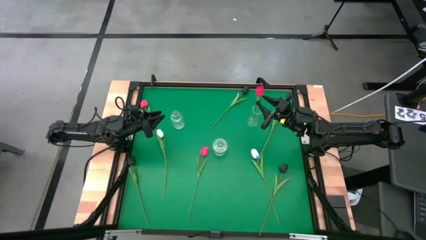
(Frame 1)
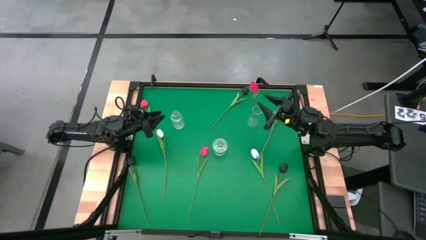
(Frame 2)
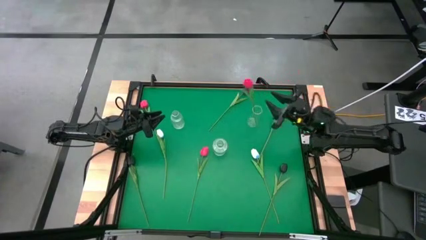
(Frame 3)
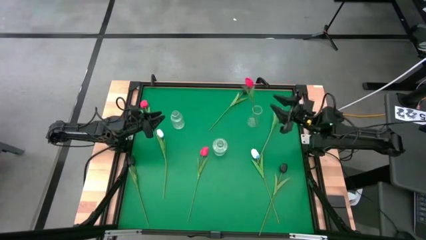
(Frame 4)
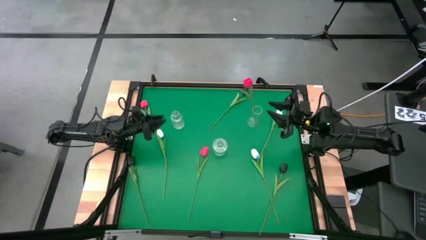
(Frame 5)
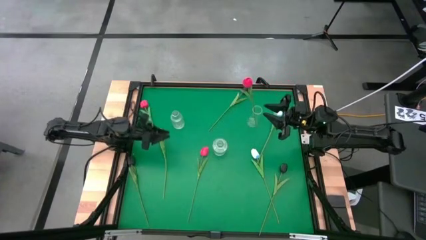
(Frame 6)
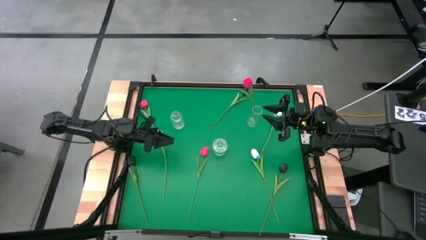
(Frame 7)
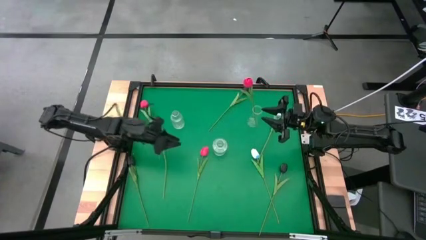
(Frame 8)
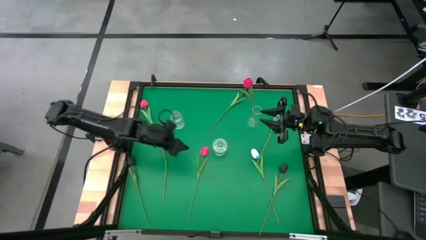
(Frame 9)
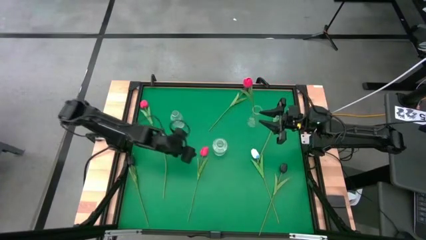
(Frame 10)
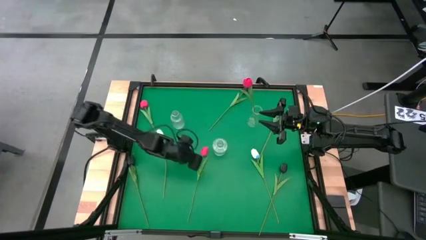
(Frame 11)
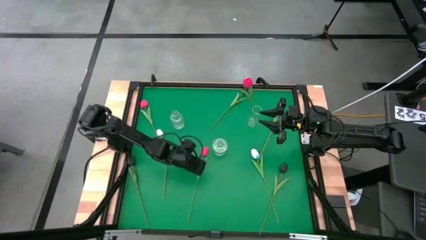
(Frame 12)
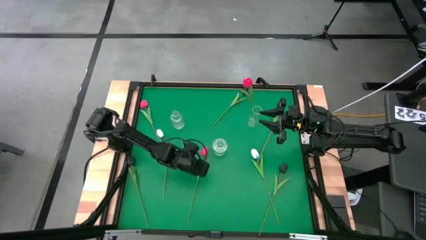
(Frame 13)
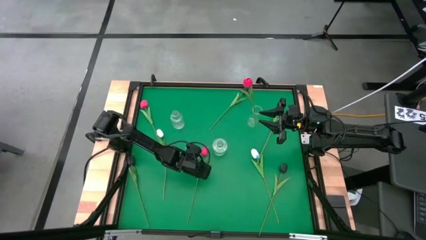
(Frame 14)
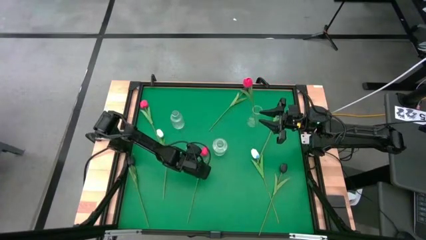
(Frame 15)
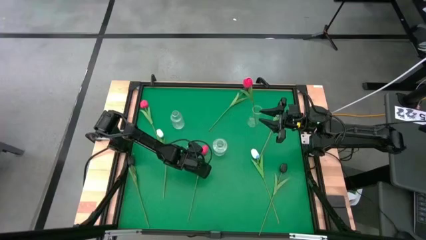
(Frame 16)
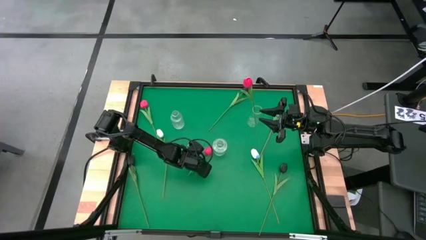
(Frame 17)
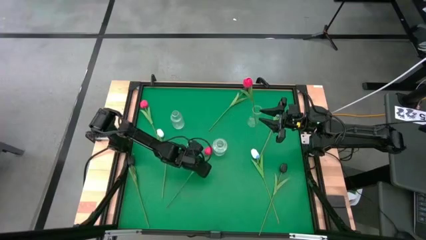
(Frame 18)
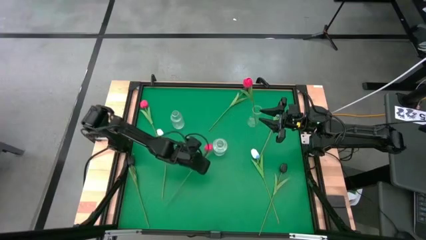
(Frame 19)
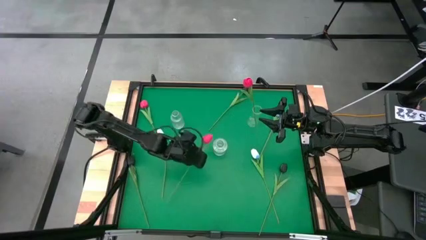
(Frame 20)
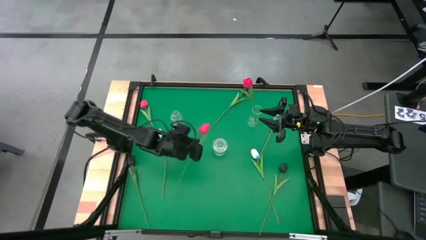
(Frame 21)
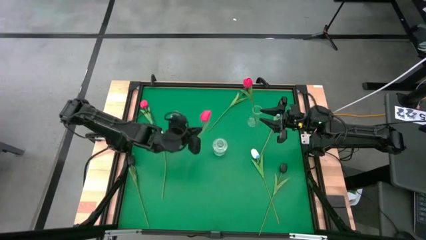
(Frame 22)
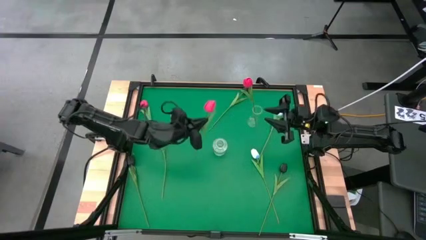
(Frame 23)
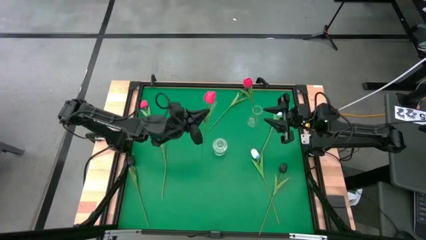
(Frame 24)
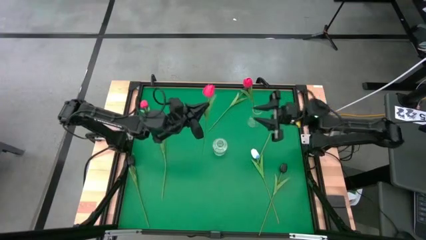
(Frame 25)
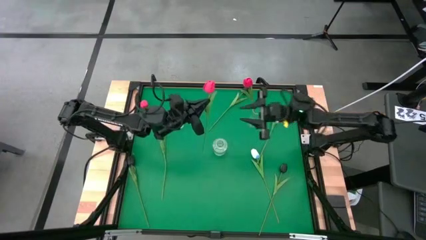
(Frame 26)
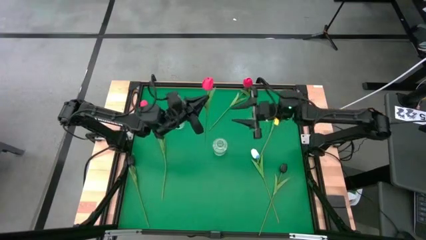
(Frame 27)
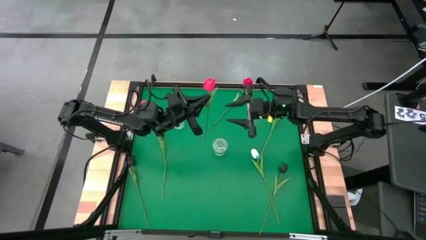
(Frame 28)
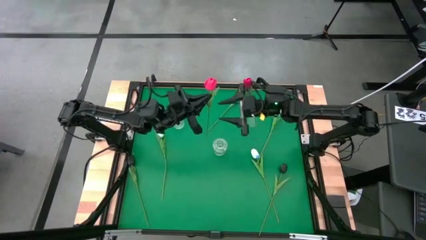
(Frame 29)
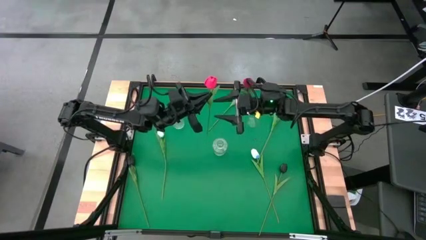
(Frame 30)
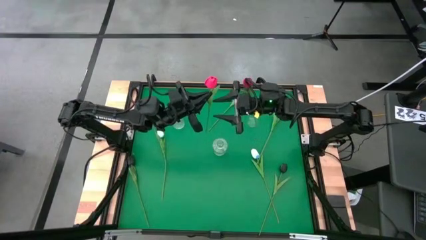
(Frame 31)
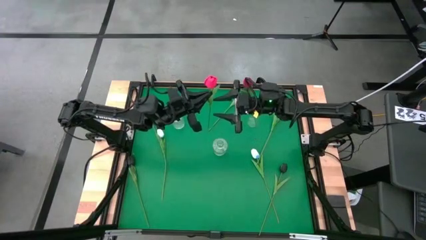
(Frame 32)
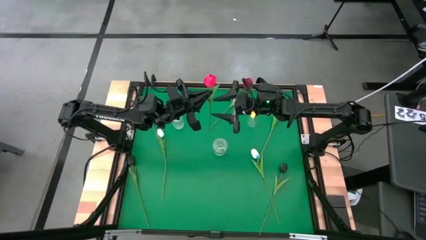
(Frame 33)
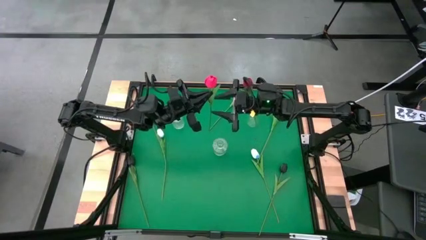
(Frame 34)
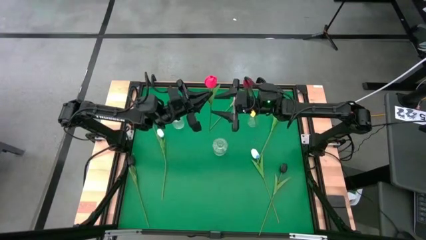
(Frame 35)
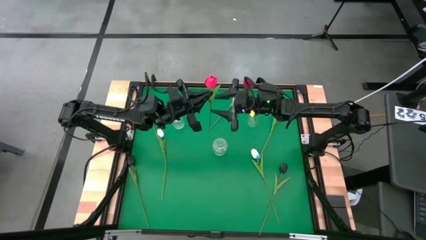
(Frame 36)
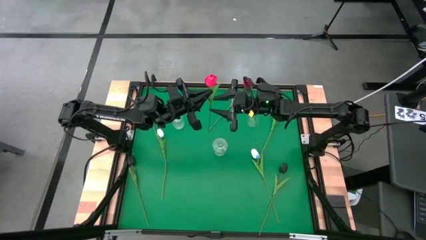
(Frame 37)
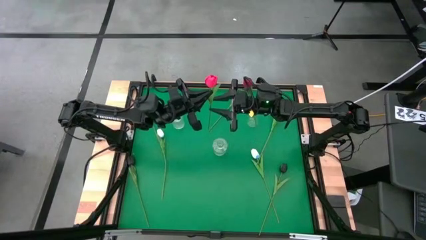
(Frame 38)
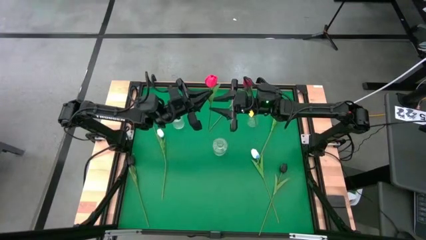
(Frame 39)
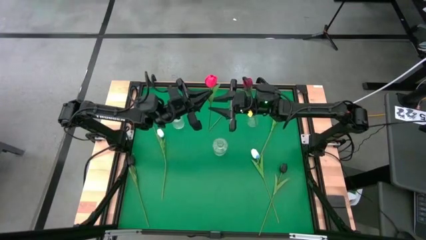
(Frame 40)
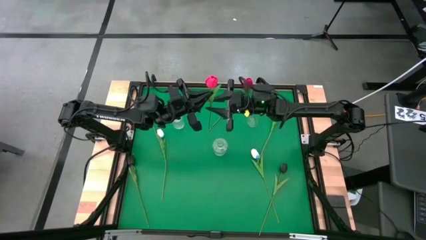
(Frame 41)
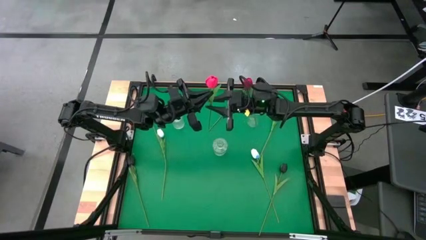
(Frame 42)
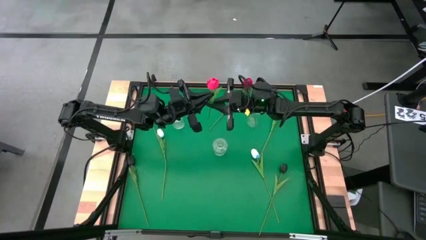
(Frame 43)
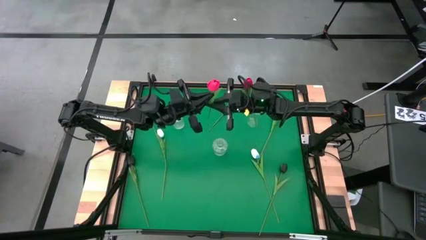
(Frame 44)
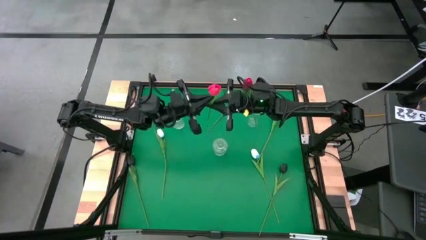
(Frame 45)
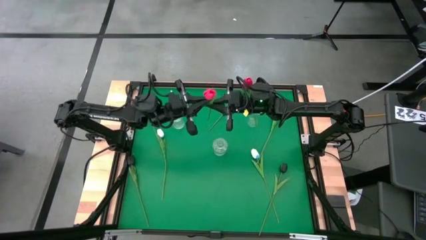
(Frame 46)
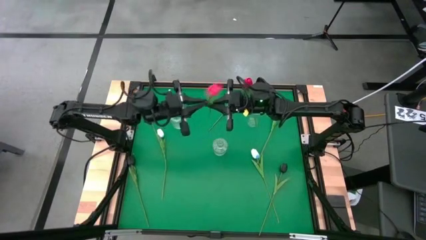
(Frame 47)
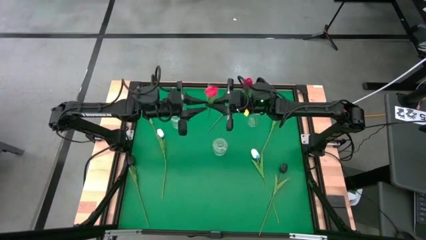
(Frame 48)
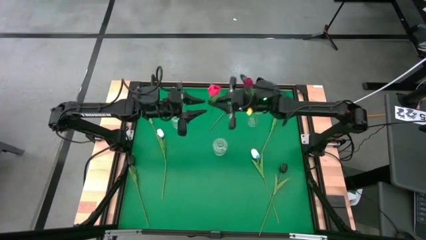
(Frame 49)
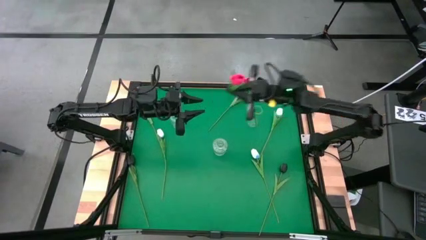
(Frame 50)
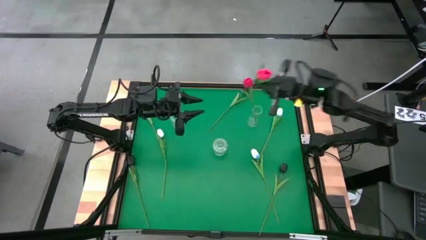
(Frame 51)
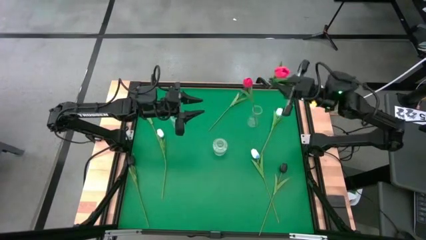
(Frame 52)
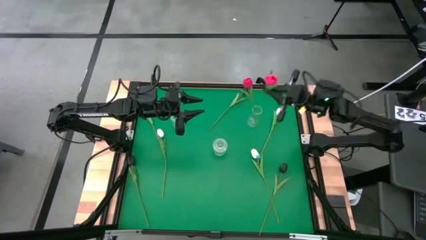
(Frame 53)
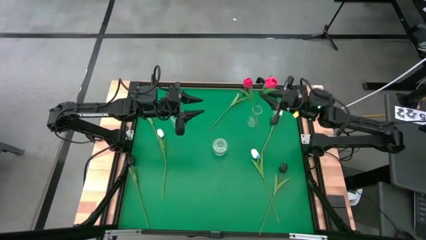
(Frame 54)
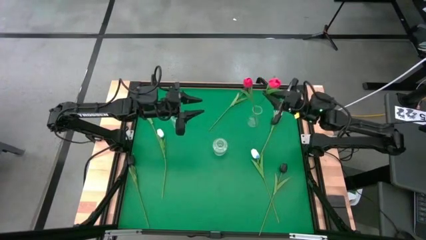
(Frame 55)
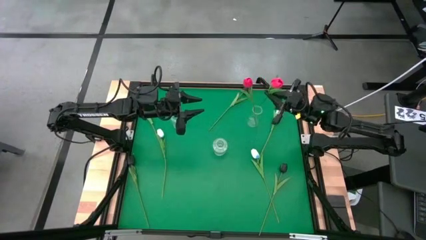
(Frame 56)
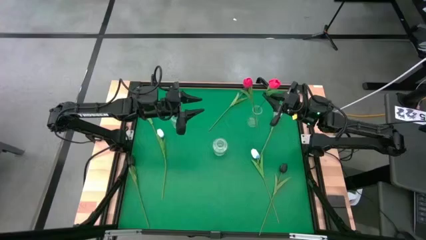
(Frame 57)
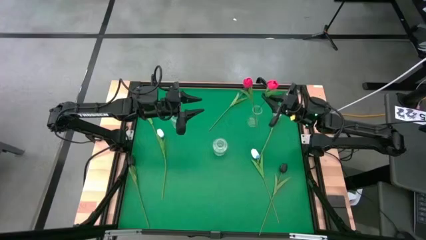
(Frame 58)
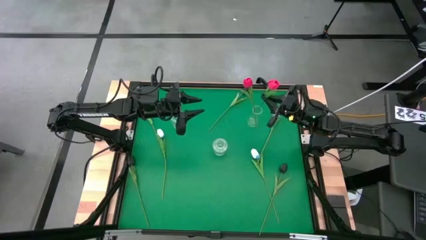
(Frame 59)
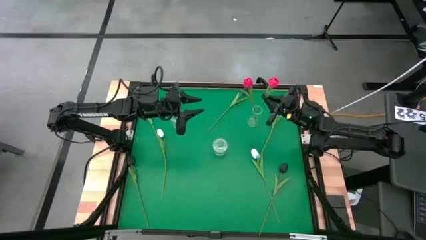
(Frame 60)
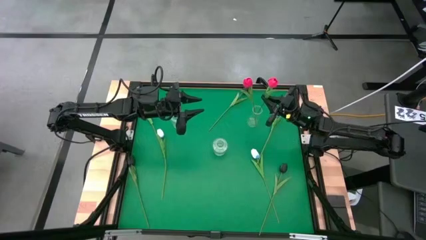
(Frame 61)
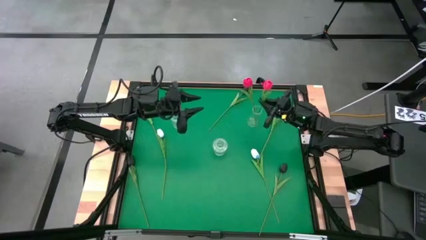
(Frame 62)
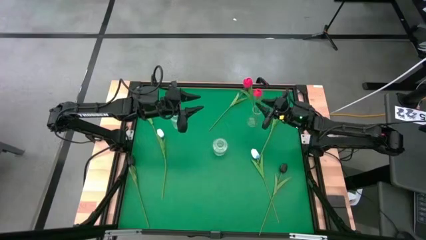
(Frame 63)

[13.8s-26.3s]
Task: Sort flowers into vase by color
Put the right red tulip into the right transparent vase
